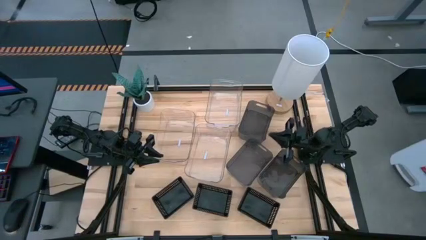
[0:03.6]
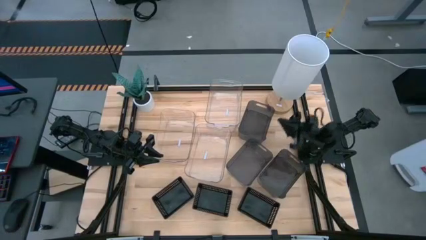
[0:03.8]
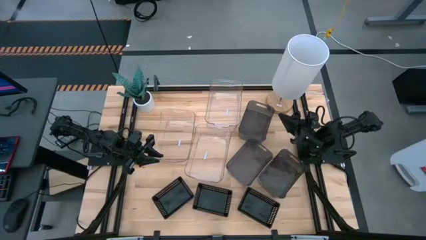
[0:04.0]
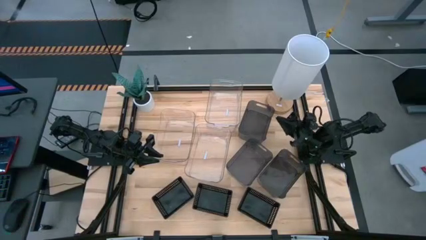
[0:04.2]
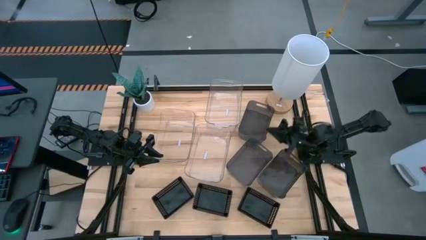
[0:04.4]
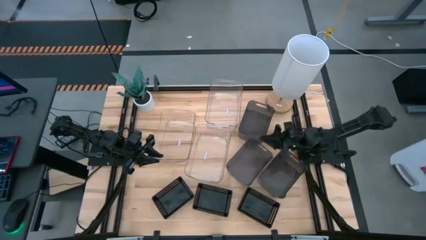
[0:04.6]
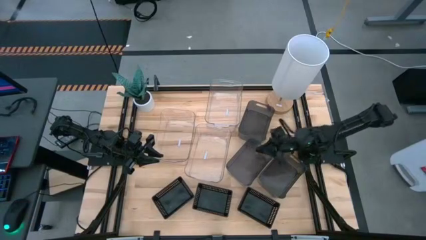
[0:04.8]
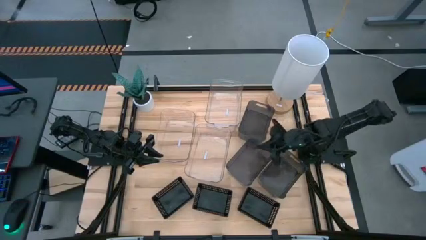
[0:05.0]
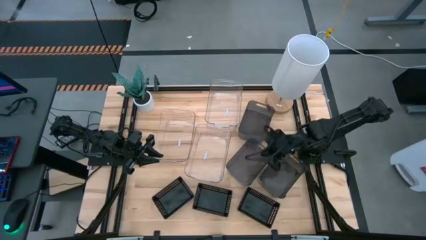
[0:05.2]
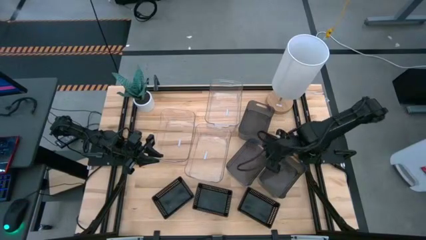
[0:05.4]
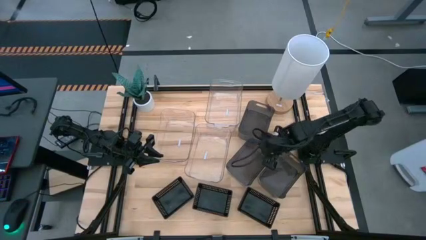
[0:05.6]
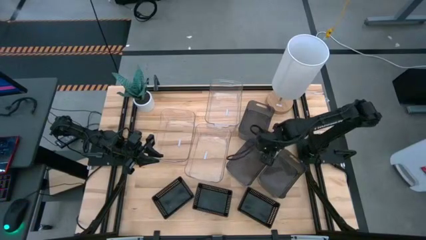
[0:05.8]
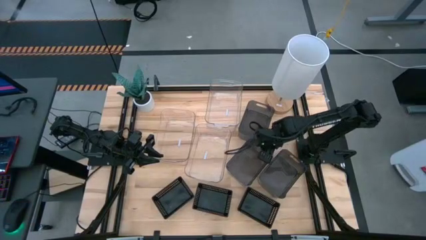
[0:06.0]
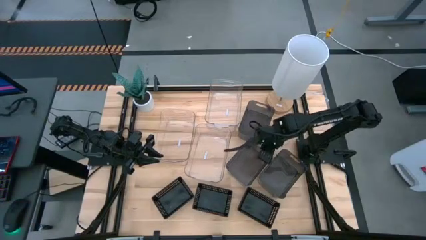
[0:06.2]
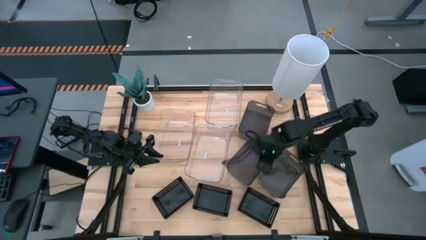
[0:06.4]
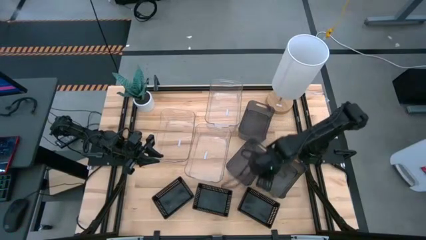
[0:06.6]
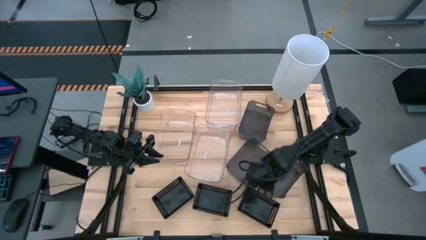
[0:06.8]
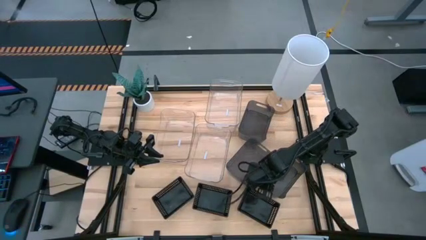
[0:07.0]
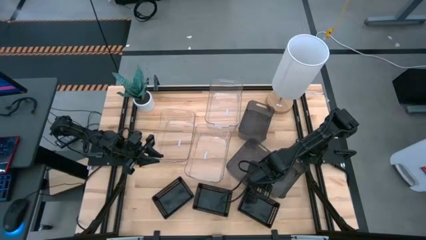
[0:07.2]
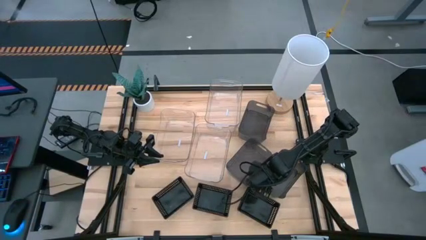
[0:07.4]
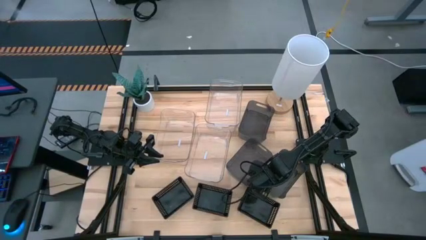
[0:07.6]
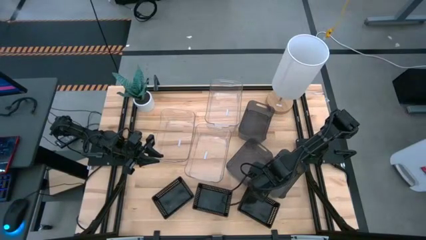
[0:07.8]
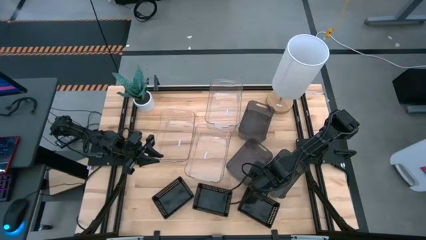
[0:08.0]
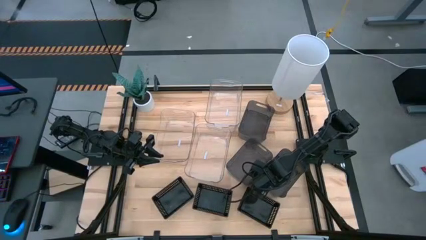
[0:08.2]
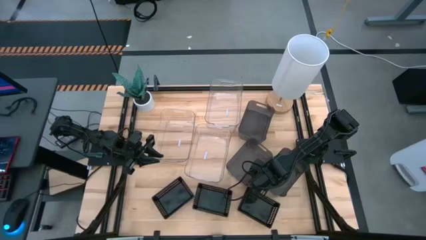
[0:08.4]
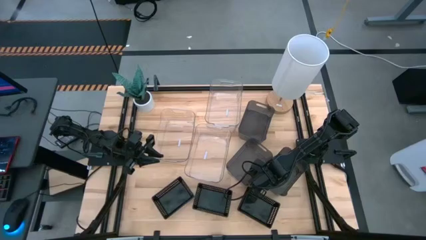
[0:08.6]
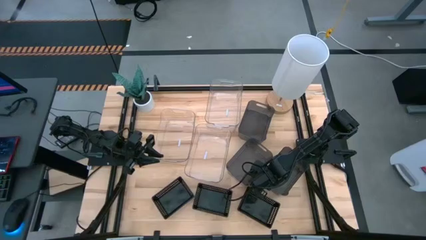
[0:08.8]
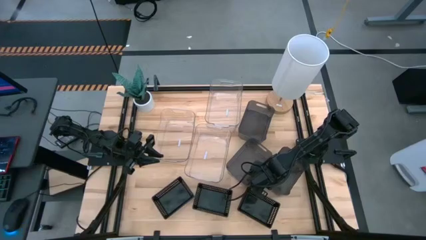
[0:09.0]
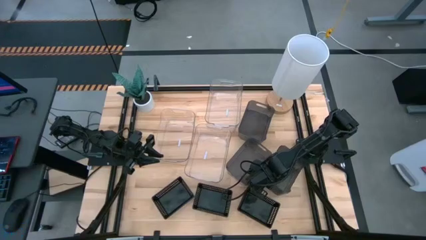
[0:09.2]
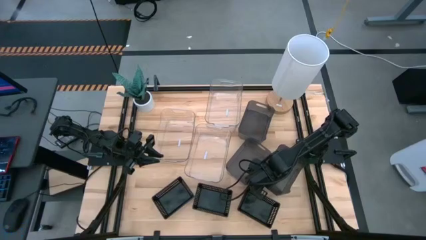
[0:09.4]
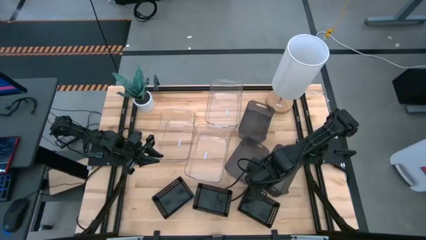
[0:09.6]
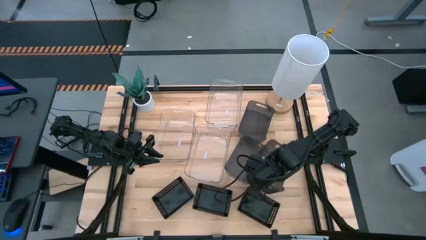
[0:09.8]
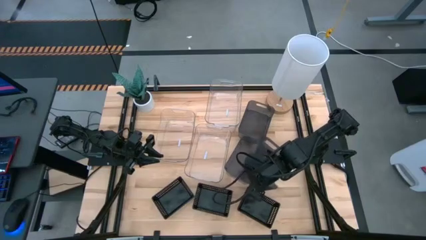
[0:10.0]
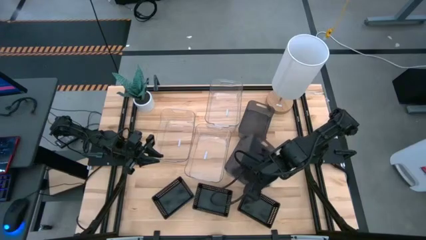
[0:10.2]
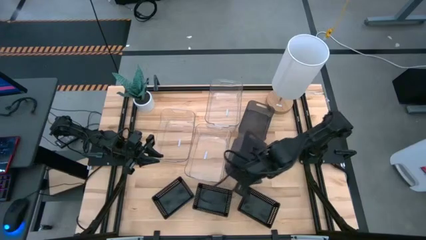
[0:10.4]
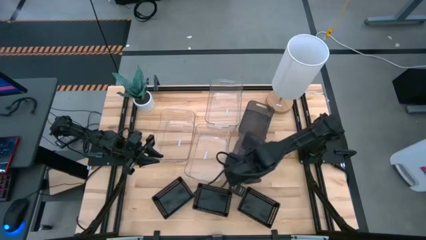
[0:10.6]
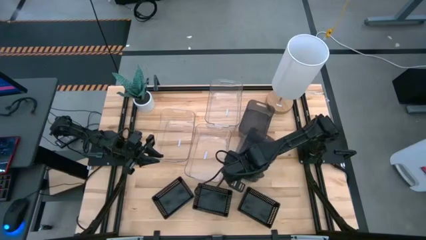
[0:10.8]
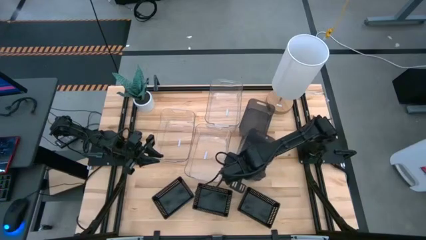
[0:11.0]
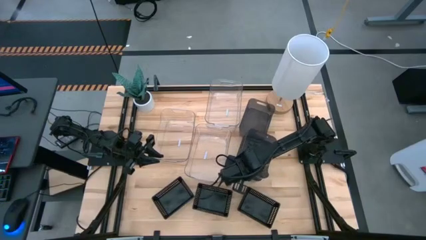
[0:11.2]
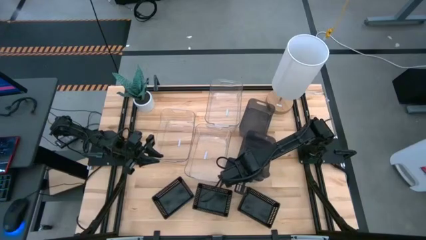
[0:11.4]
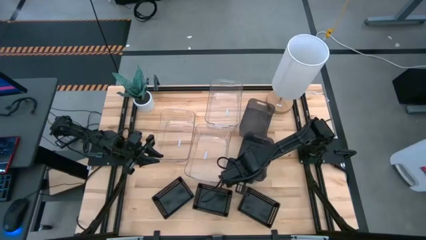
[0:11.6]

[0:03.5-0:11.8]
Stack the bottom right transparent bin on top of the bottom left transparent bin

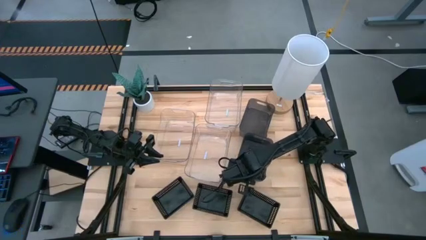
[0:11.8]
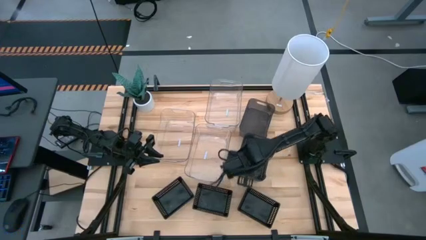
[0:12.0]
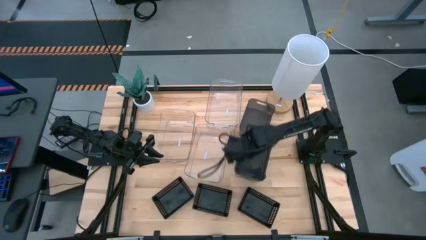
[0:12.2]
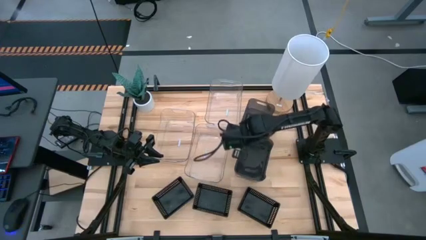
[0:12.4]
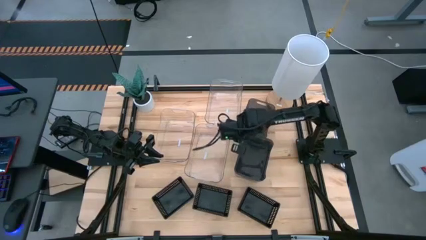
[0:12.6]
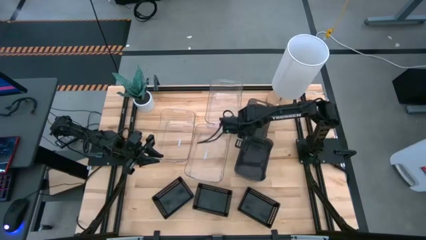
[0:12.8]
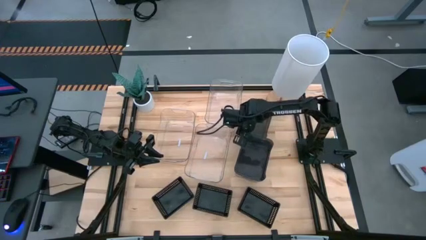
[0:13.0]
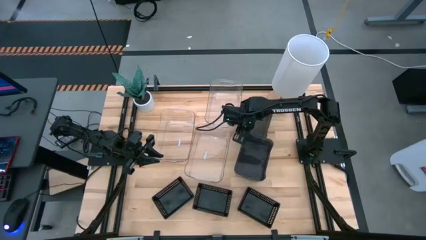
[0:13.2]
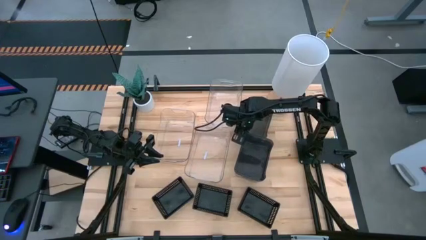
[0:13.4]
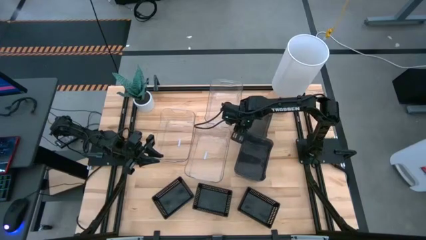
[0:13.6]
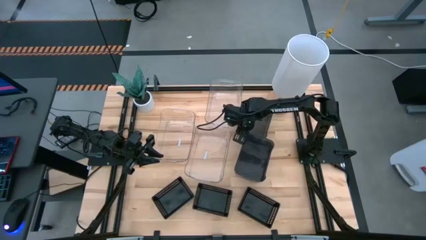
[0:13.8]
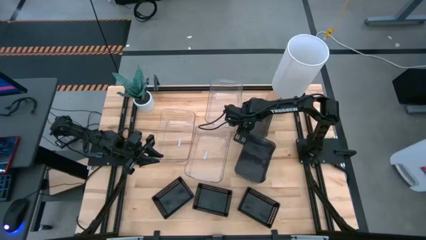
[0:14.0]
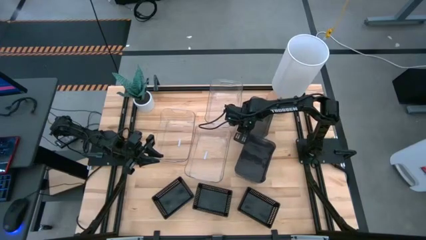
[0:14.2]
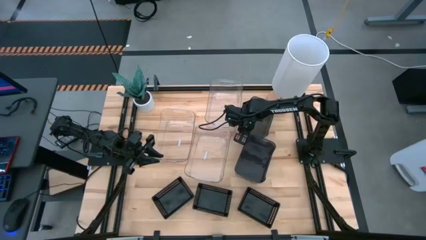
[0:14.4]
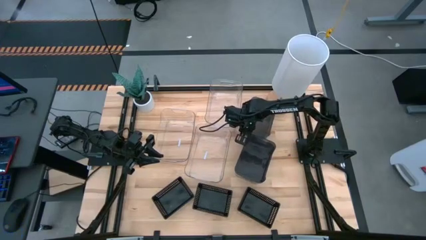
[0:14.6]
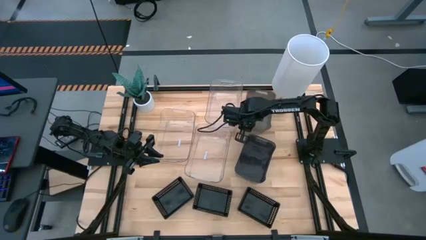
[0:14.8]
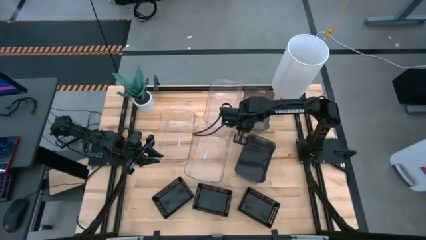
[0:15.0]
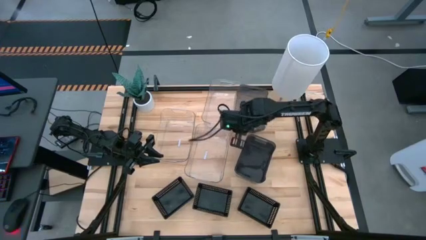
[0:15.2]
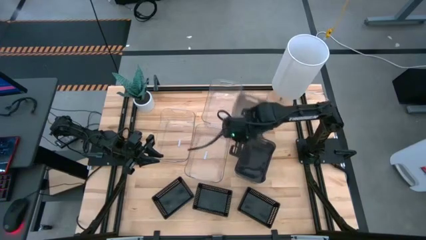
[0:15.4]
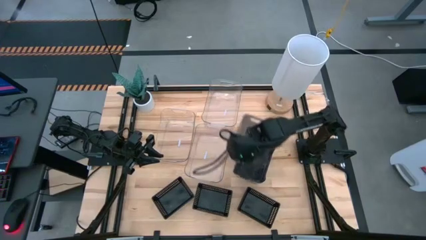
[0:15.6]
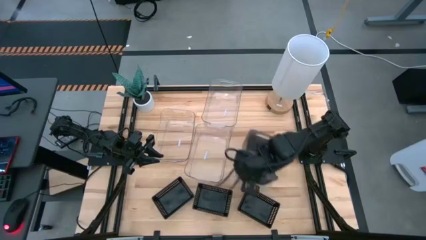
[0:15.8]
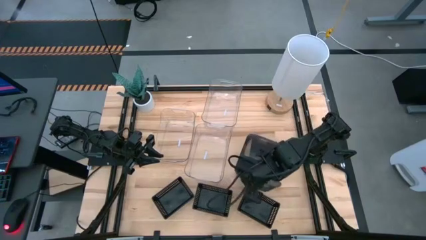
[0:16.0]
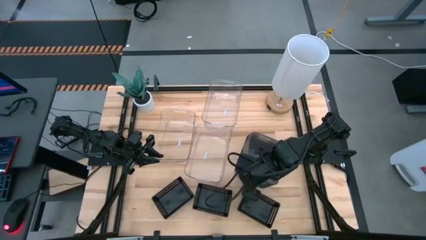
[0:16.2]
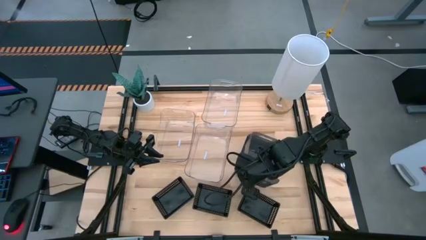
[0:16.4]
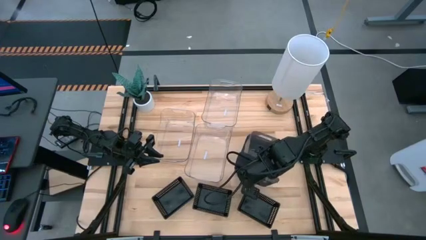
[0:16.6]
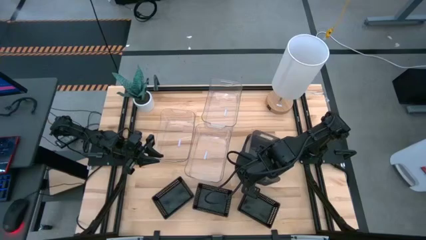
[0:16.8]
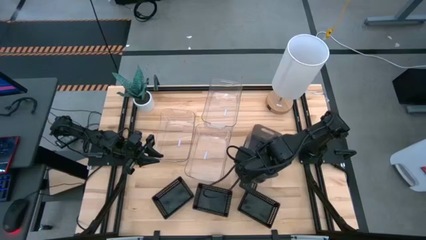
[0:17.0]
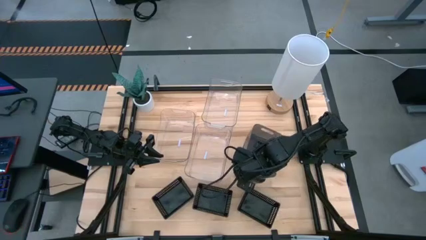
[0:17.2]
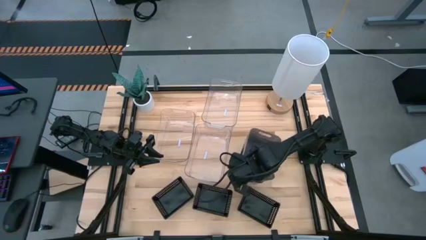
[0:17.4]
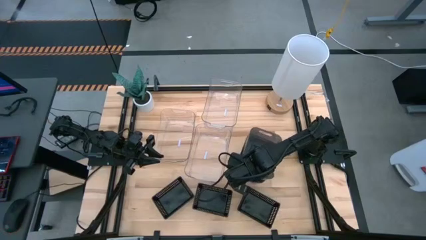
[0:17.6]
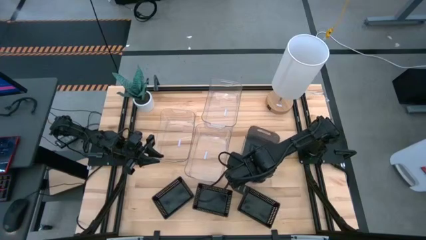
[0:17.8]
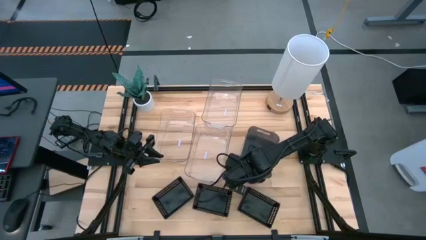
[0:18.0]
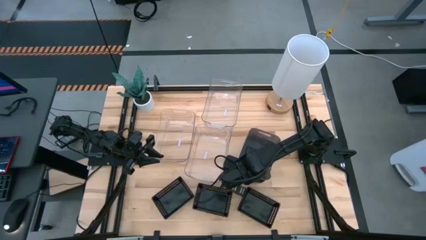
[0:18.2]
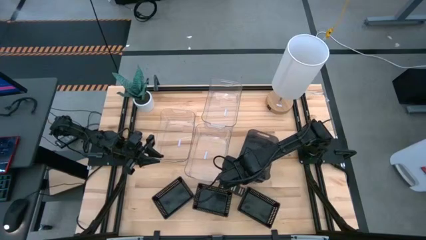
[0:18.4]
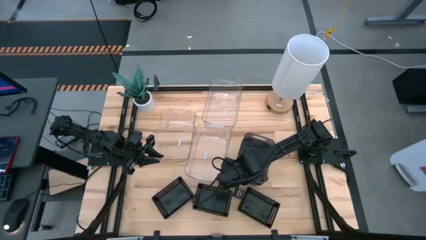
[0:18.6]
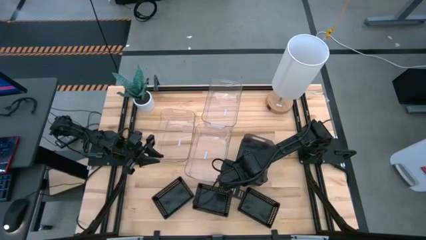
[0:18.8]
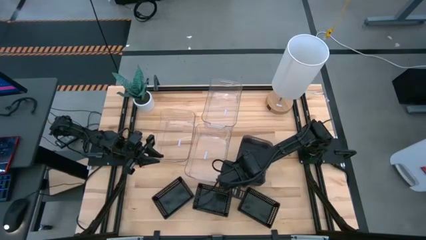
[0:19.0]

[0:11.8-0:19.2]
Stack the top transparent bin on top of the bottom transparent bin

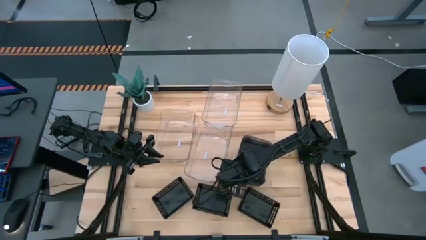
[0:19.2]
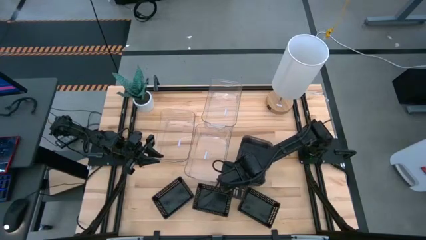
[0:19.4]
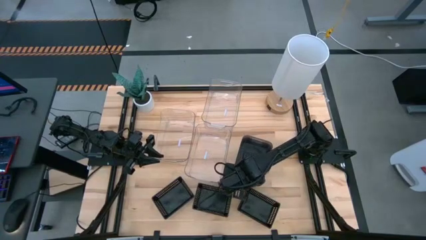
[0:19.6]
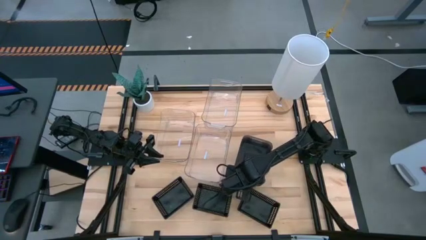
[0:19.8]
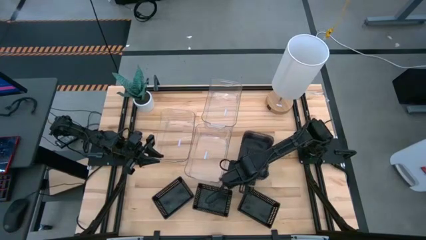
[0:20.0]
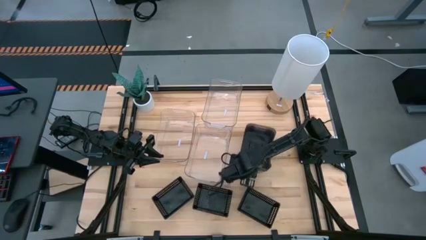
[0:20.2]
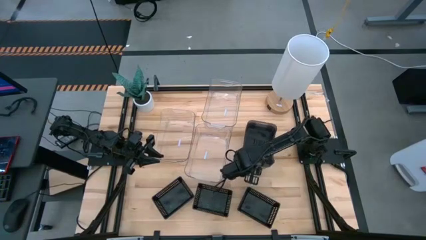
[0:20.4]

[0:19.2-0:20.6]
Adjust the transparent bins
